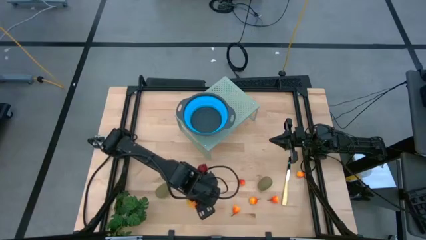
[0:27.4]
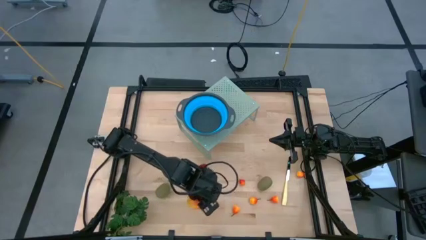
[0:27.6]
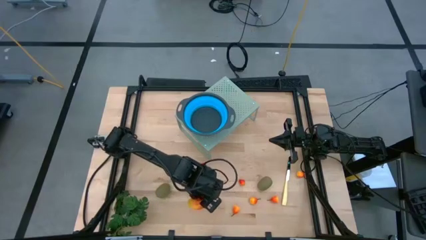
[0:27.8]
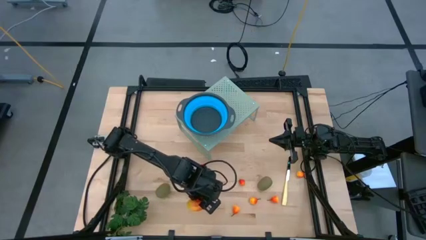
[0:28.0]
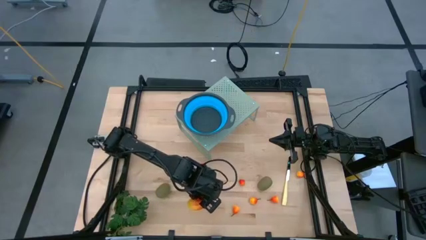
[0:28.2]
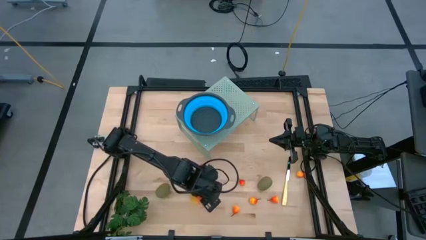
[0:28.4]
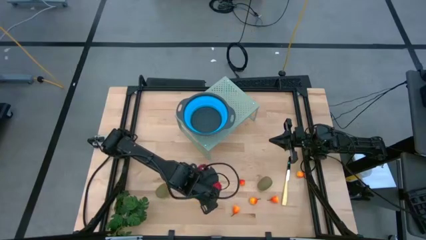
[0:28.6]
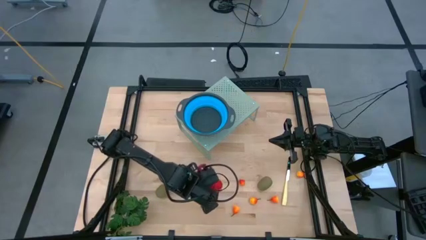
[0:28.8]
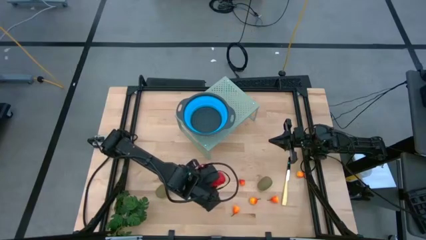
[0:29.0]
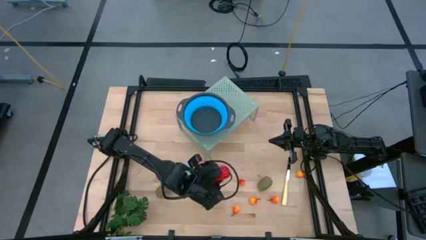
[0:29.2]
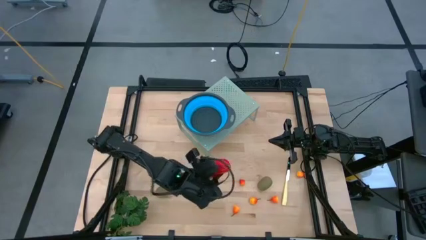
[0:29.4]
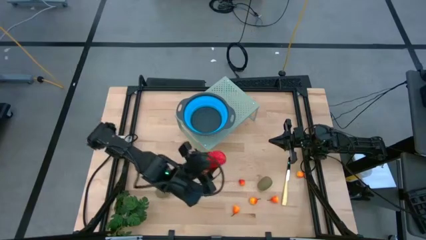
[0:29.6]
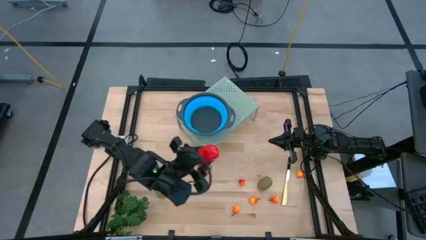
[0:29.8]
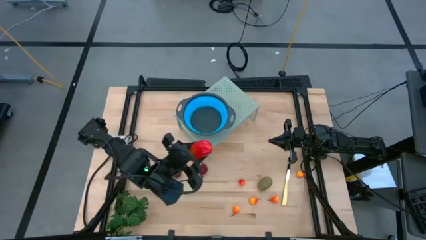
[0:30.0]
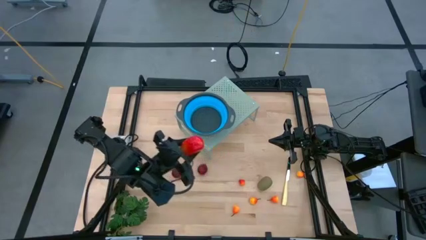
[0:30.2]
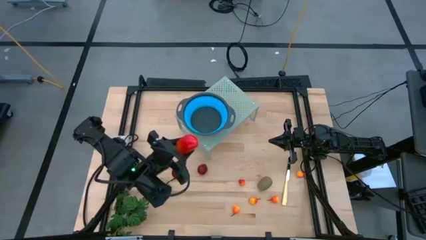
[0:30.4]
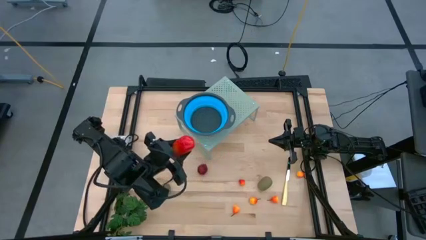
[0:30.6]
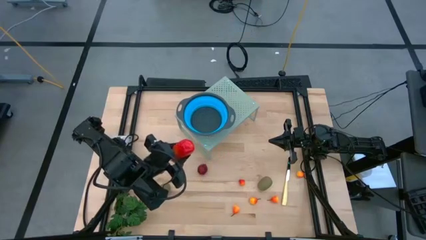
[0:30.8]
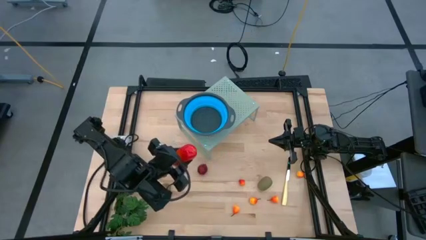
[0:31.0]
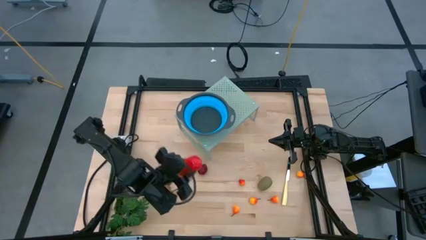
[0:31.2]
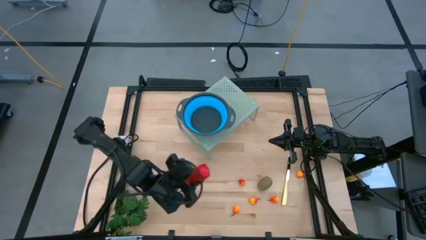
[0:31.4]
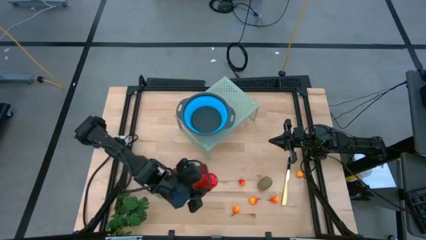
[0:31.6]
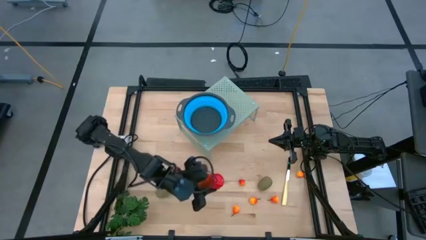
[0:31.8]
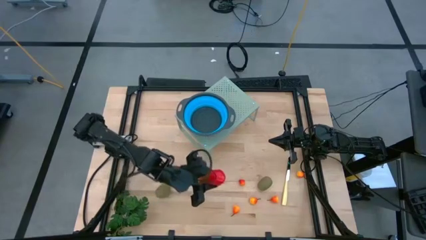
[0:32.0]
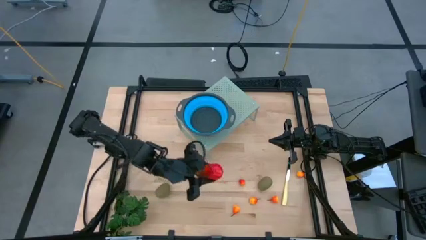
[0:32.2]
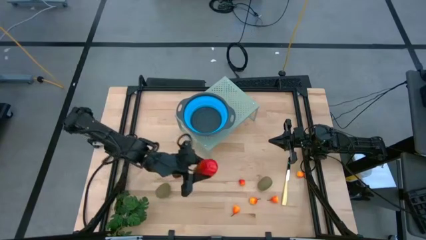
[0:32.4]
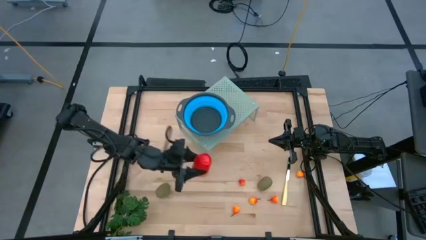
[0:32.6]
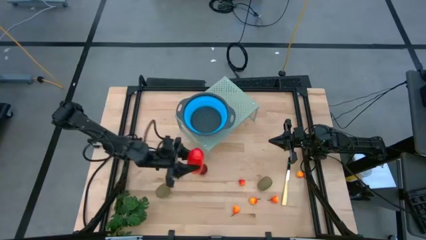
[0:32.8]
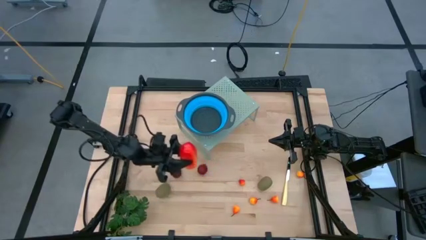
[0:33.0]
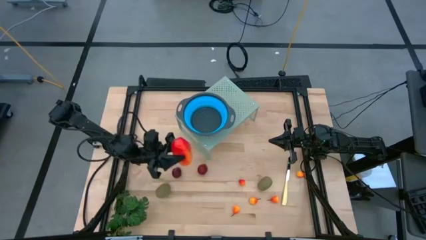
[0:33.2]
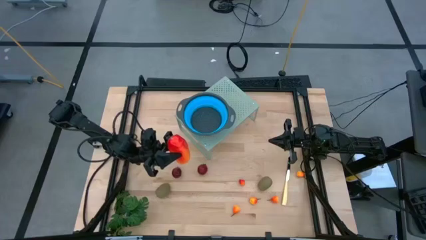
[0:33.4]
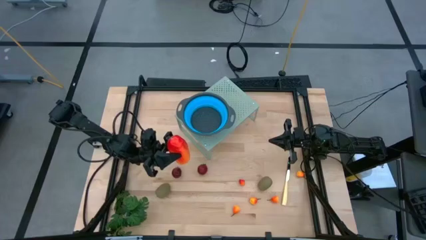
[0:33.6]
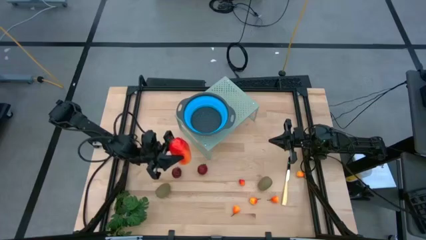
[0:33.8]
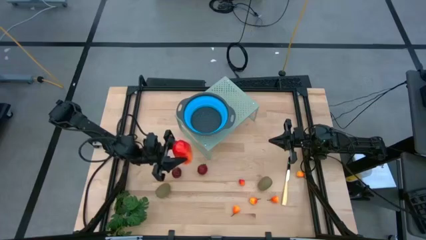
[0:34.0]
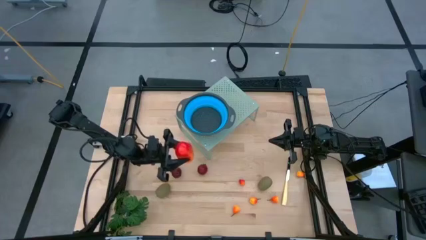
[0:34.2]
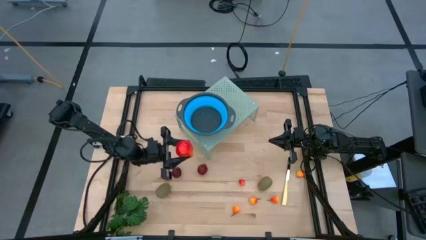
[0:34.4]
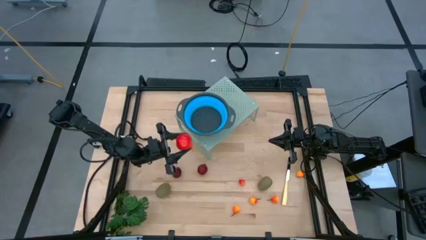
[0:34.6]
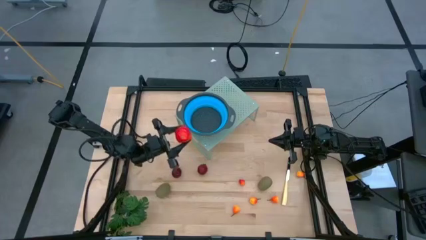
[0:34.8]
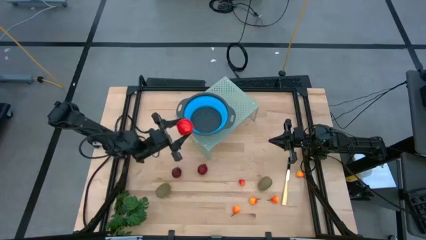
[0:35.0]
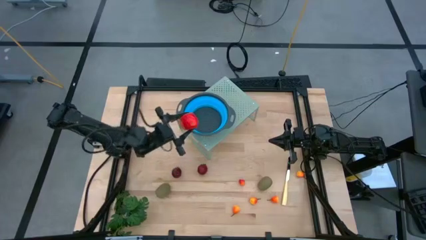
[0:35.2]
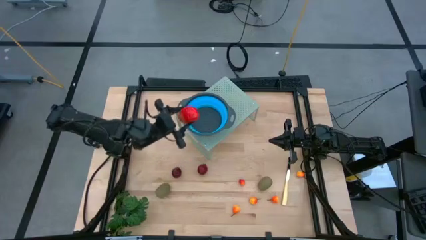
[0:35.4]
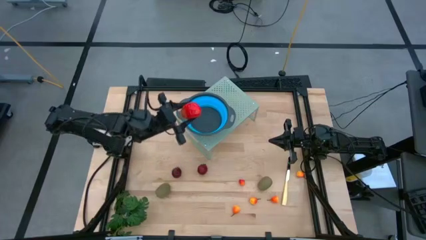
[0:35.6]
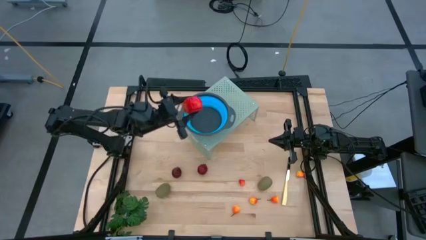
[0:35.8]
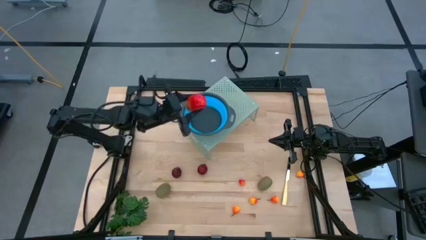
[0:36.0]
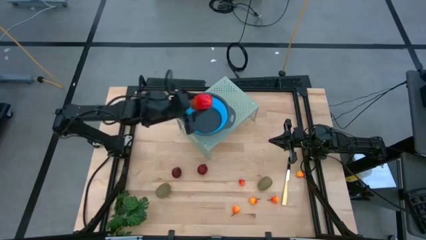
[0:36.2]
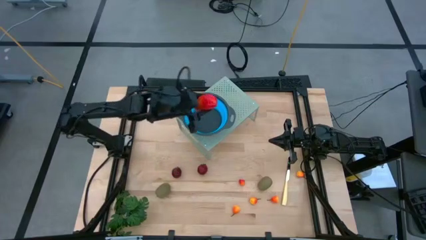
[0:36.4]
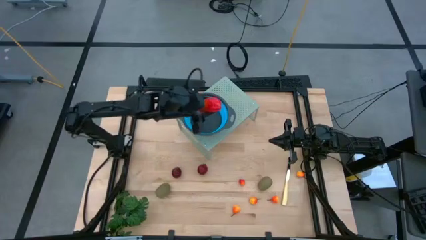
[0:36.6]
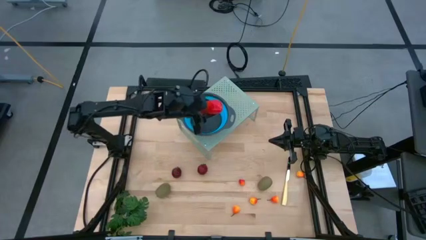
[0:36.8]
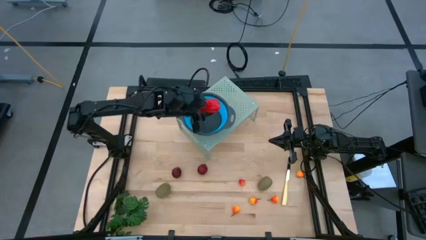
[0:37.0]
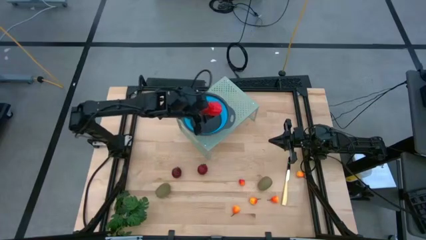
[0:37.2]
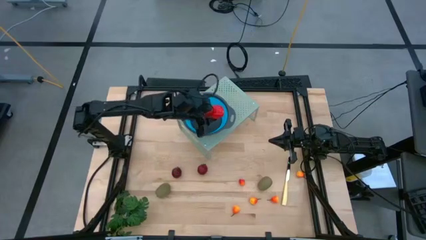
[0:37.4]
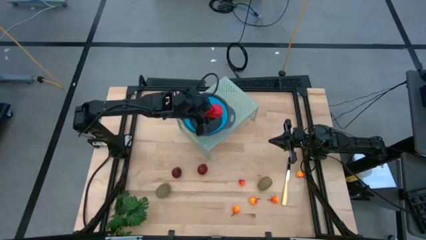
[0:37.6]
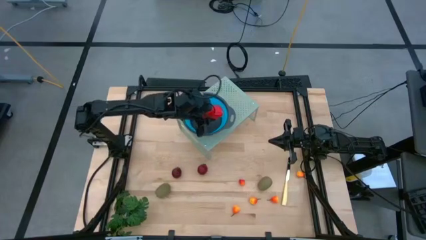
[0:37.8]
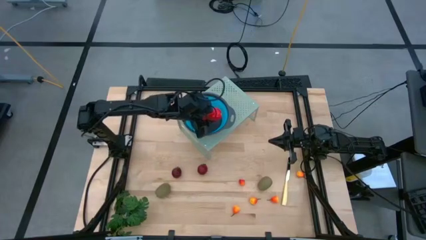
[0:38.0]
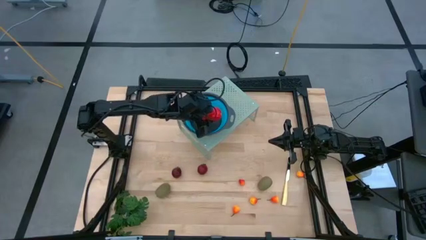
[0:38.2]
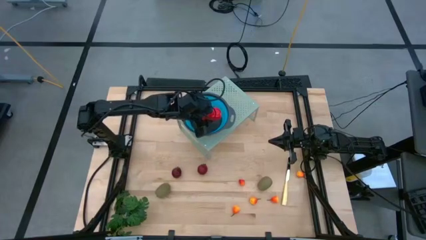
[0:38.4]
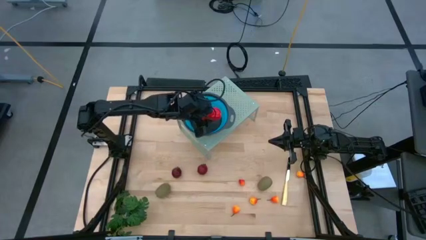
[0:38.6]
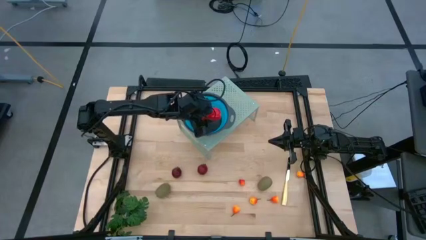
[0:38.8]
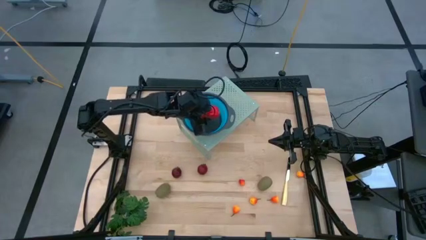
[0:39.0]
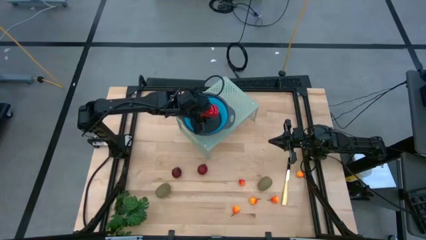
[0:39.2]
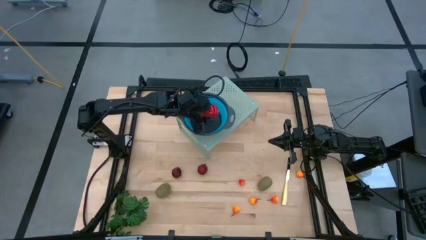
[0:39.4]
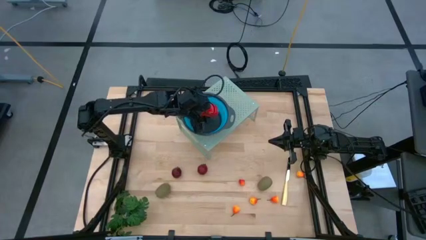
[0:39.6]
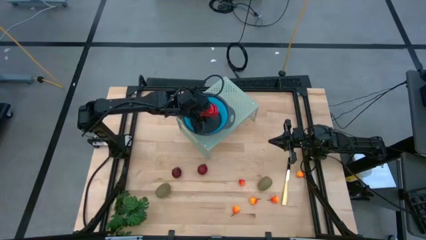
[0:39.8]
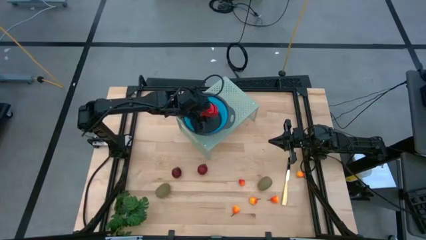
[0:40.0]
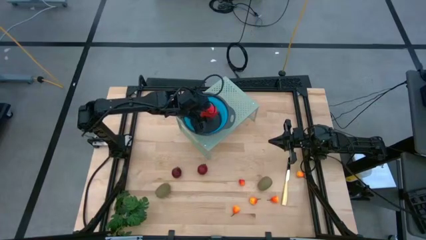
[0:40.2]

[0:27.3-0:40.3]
Task: Pick & Place Fruit
Put the mango into the collapsible colander on the shelf
